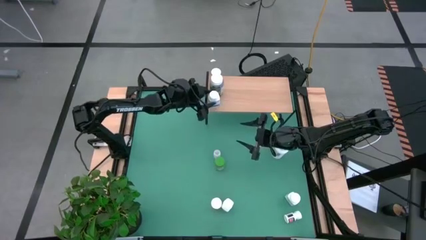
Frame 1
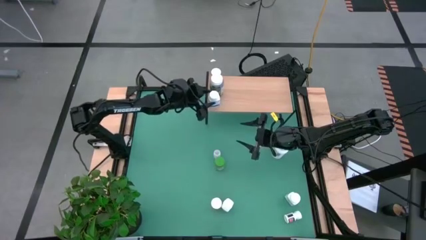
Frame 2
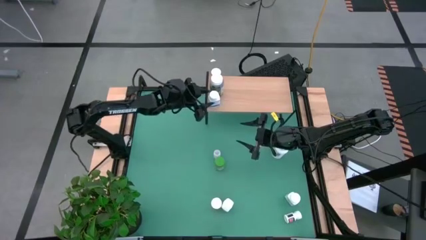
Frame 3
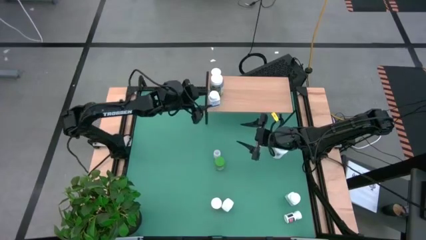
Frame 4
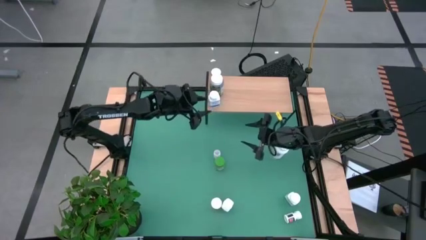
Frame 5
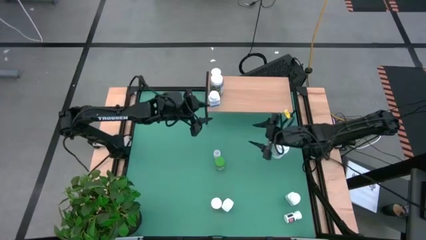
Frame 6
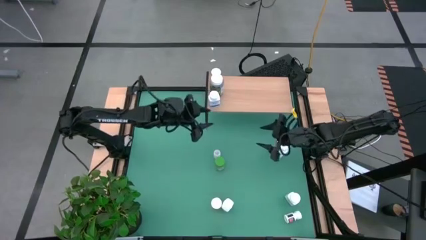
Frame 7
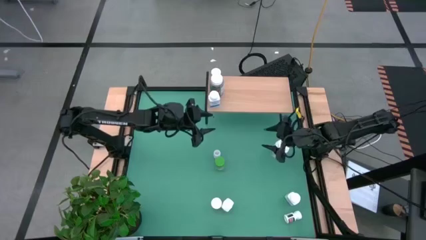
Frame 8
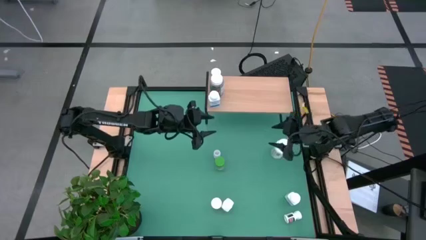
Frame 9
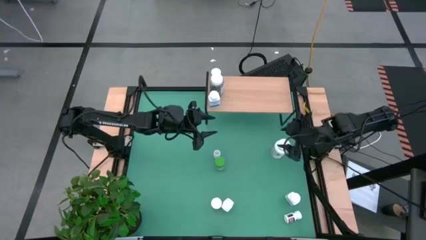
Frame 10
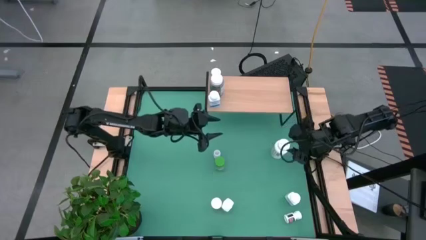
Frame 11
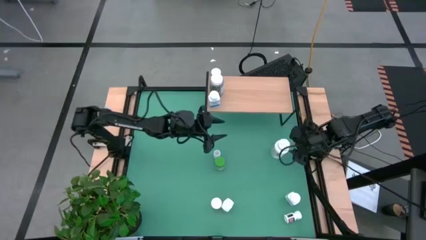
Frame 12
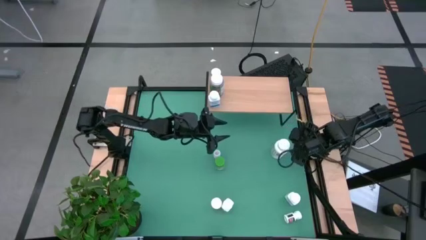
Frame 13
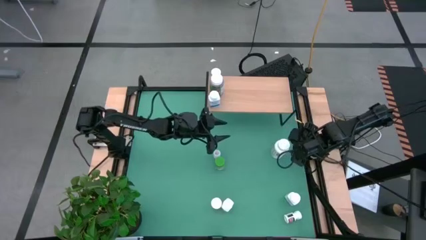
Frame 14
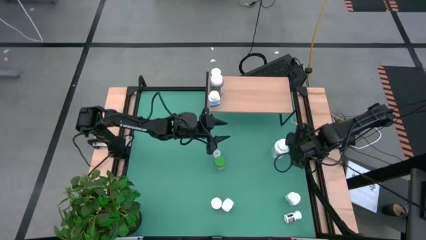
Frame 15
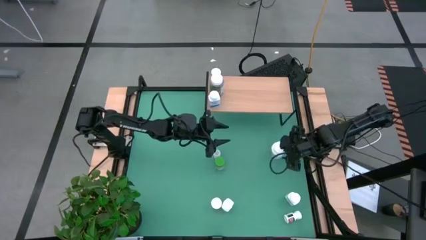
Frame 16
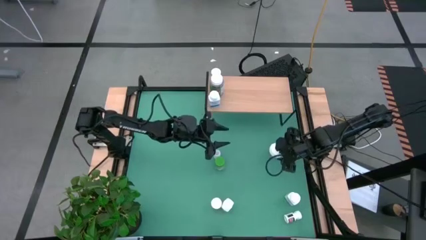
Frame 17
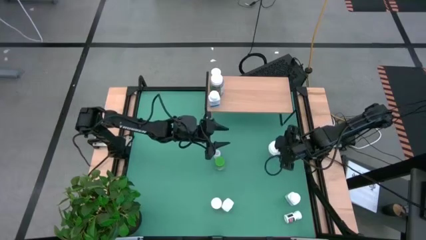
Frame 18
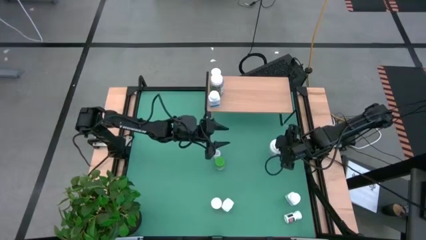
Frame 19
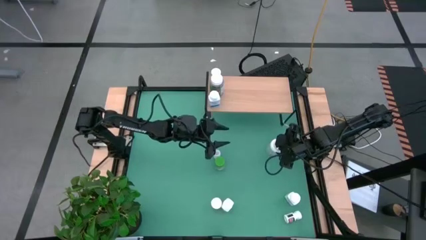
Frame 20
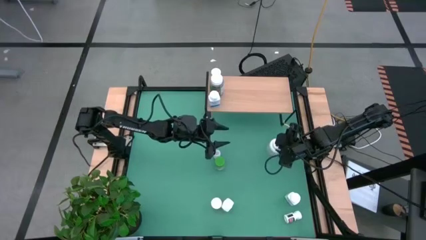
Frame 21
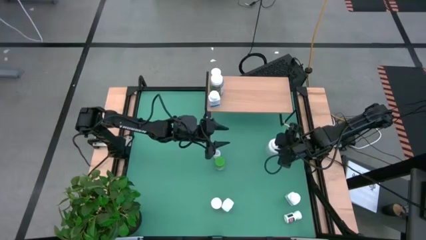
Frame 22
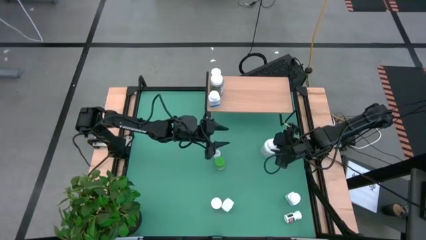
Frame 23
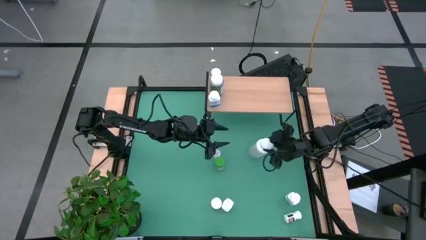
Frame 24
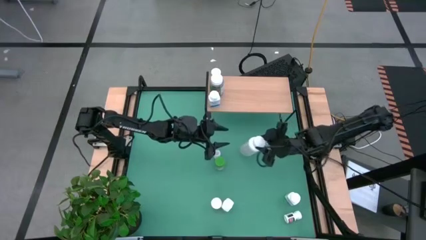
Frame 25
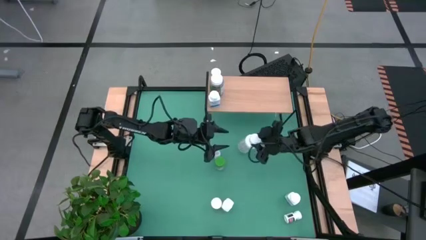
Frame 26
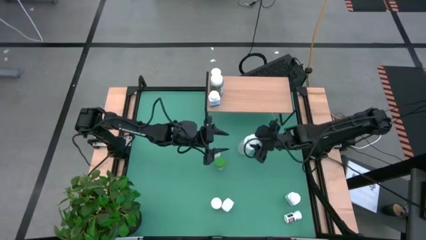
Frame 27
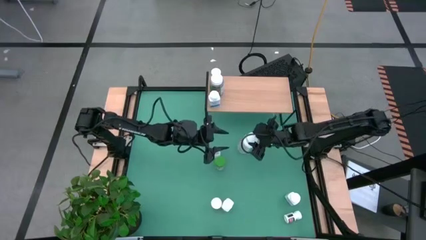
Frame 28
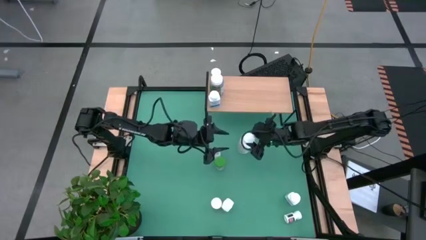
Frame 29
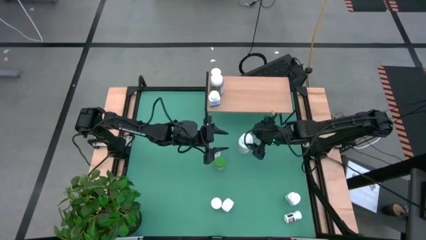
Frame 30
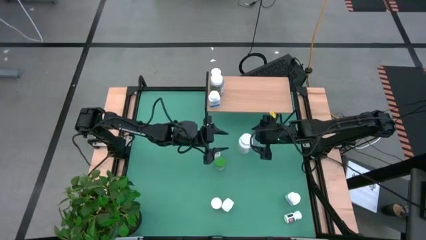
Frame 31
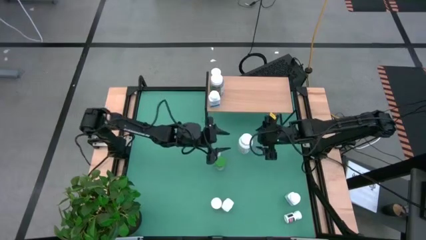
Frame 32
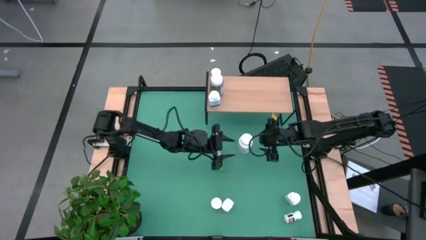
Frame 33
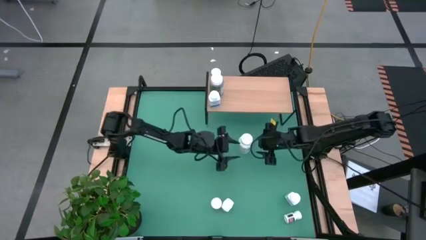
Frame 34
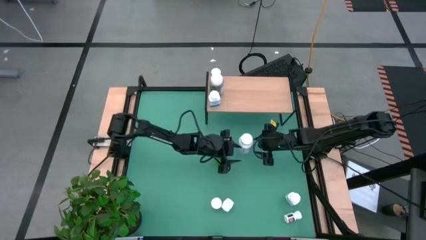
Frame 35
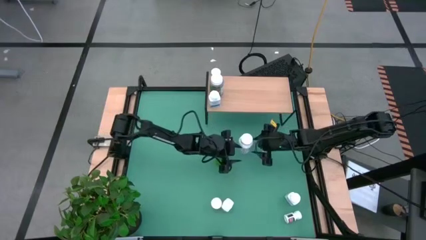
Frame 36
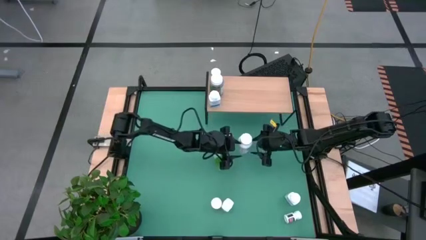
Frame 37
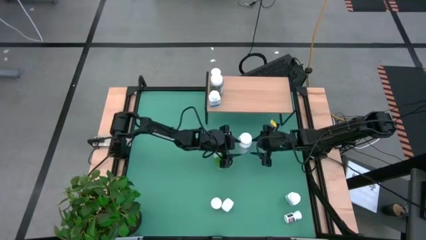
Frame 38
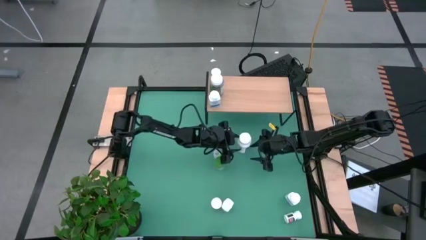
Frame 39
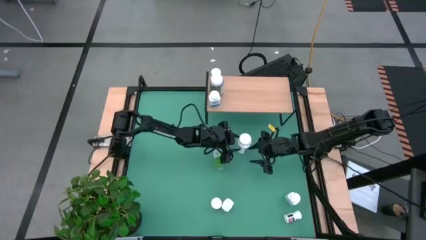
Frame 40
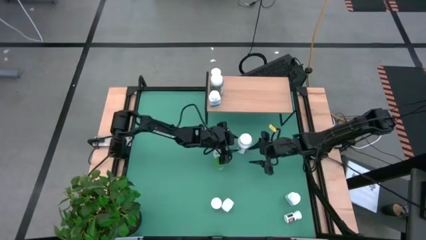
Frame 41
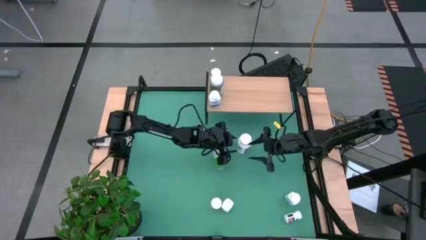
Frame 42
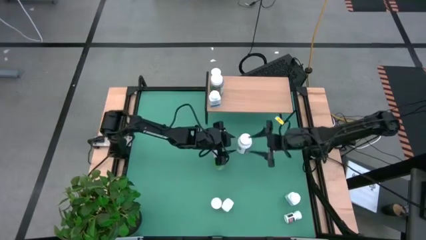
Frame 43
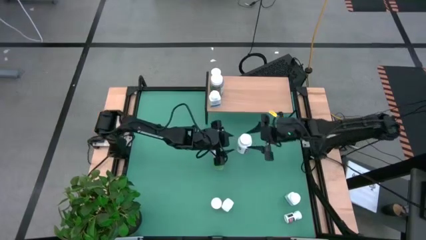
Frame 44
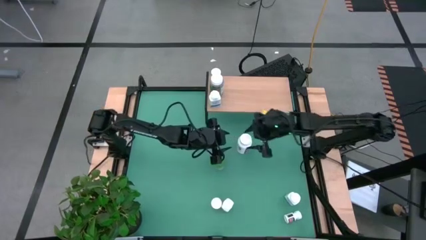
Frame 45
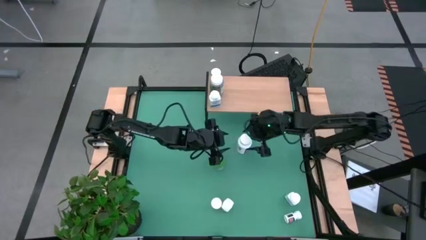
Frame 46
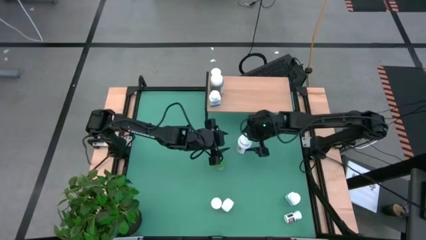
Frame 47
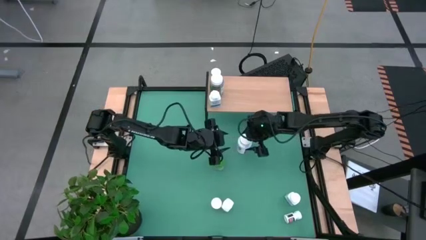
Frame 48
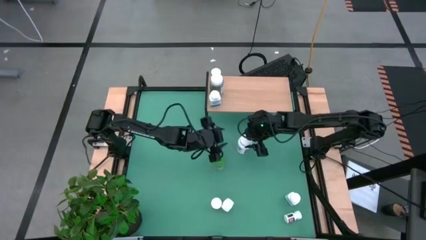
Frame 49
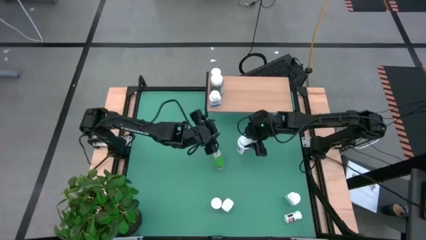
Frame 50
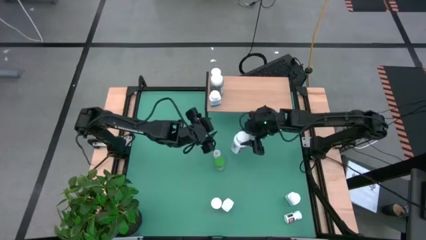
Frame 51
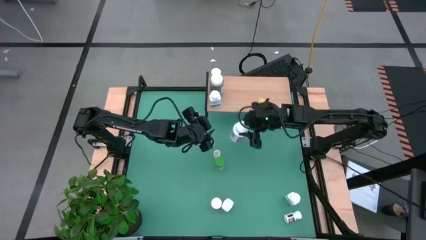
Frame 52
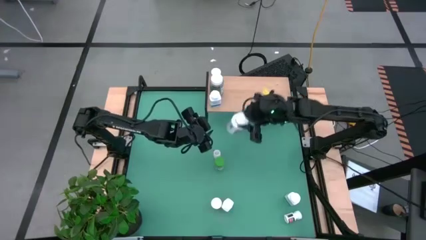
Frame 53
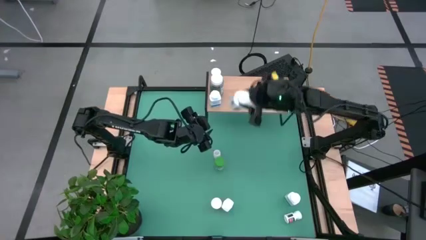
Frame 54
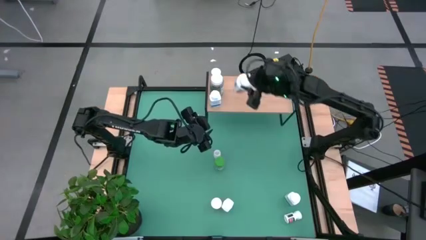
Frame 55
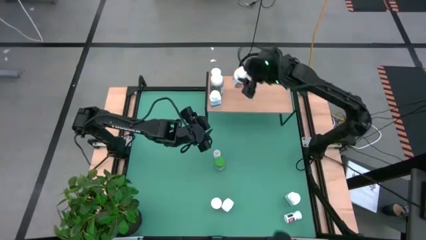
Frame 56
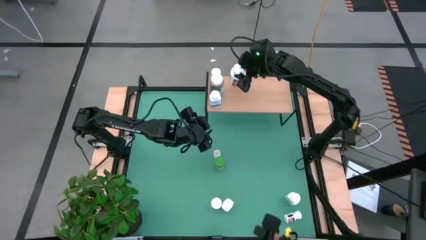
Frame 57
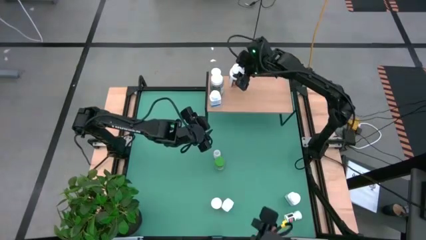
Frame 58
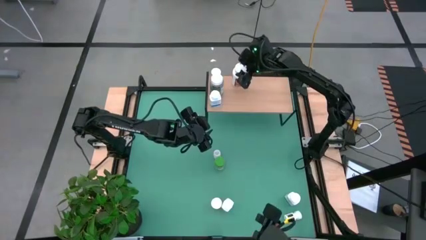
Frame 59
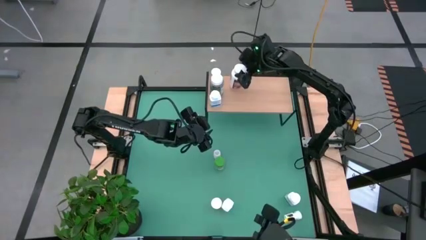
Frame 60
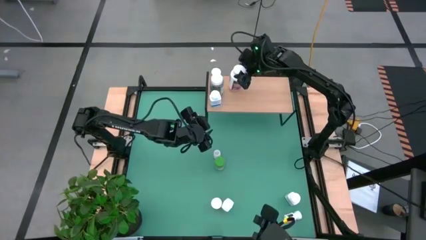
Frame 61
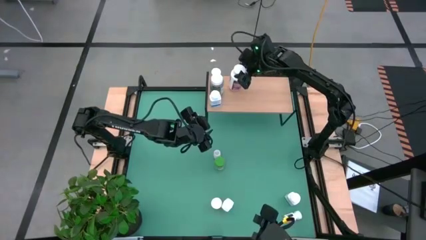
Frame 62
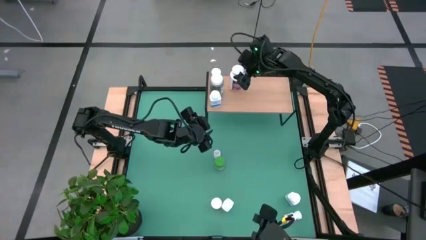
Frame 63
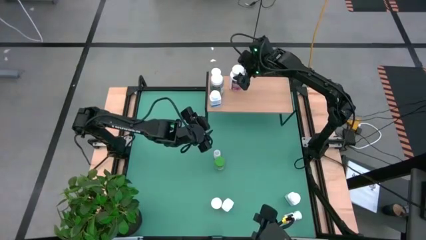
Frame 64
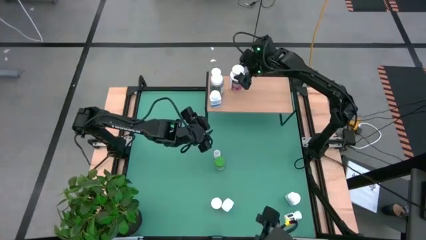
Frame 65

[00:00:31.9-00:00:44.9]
Task: Pick and place medicine bottles onto shelf by color
Put the white and red pill bottle on the shelf

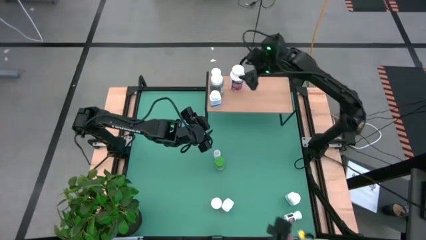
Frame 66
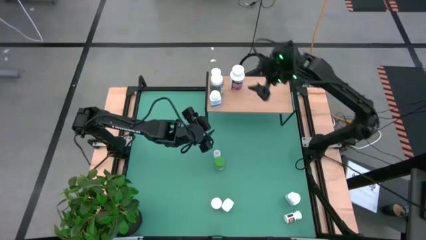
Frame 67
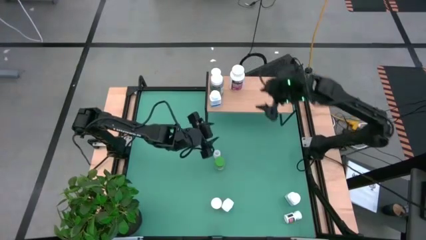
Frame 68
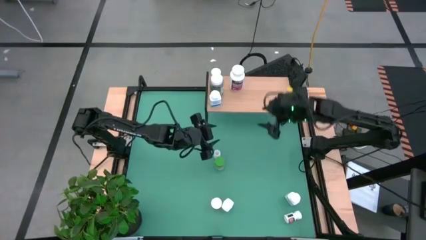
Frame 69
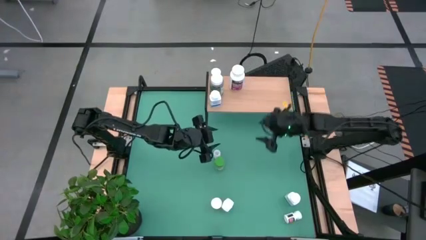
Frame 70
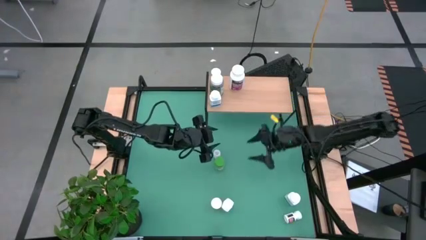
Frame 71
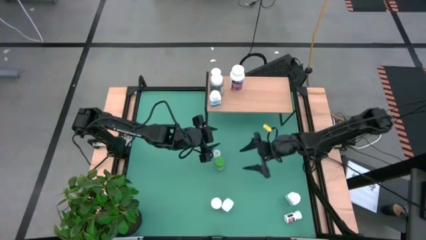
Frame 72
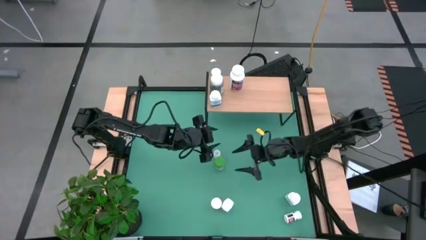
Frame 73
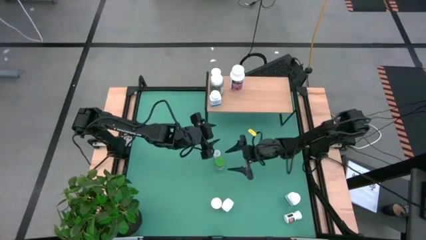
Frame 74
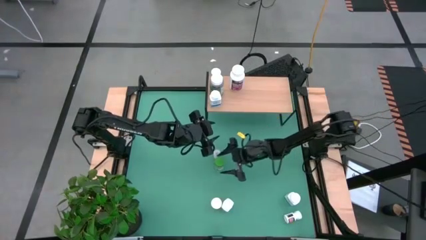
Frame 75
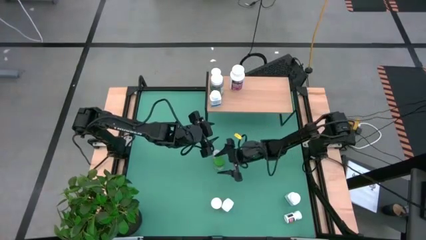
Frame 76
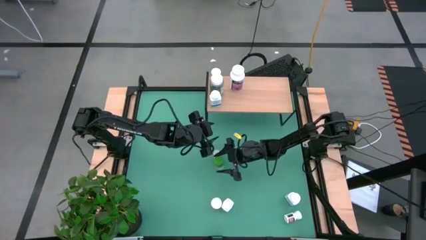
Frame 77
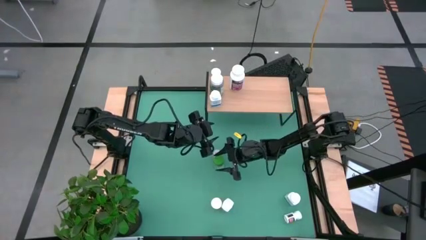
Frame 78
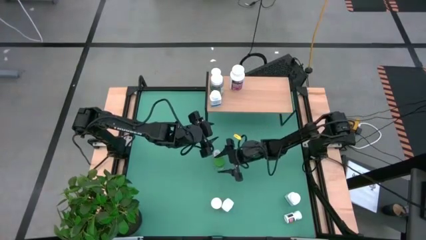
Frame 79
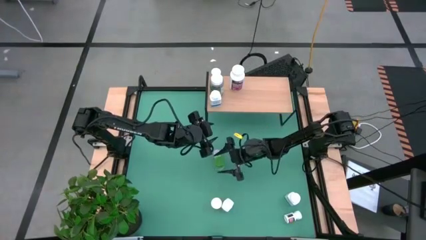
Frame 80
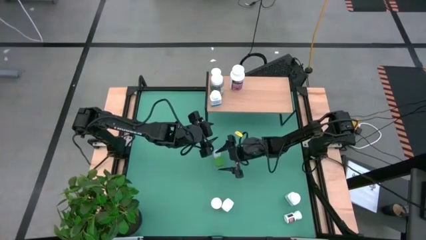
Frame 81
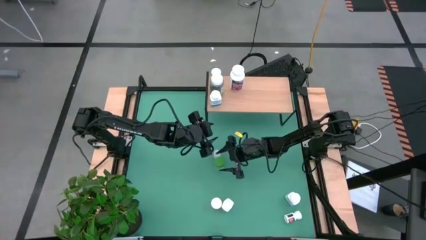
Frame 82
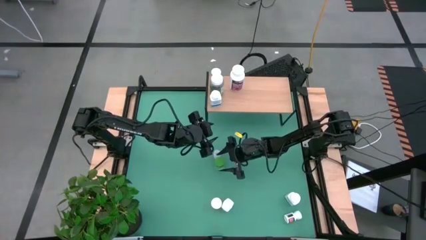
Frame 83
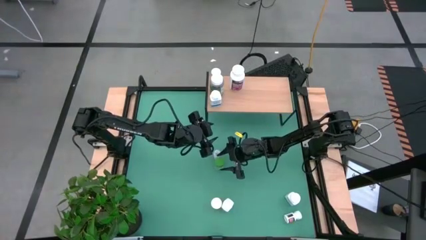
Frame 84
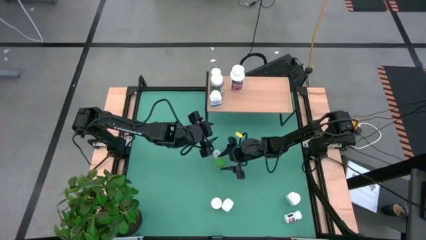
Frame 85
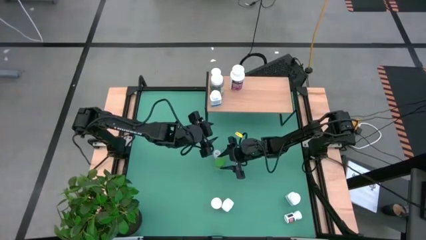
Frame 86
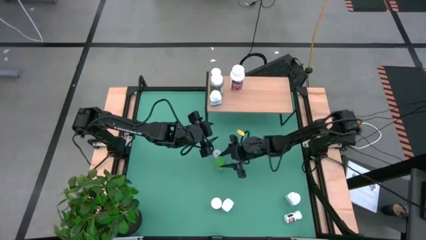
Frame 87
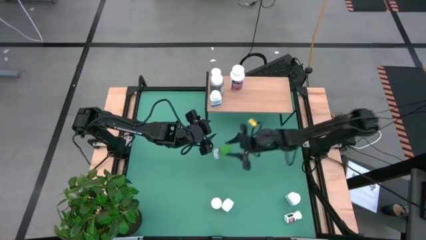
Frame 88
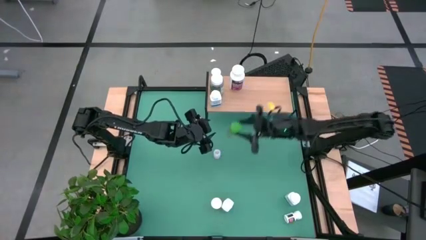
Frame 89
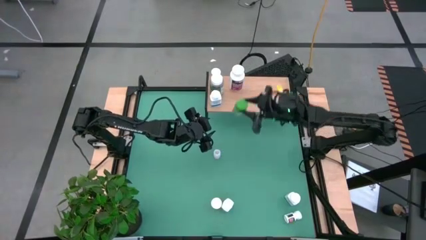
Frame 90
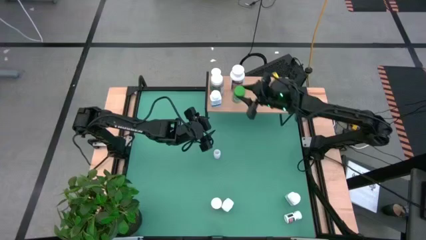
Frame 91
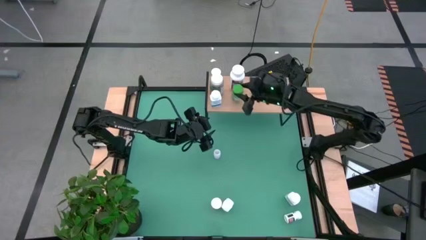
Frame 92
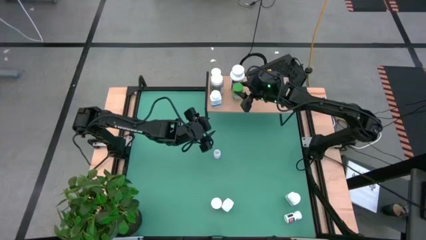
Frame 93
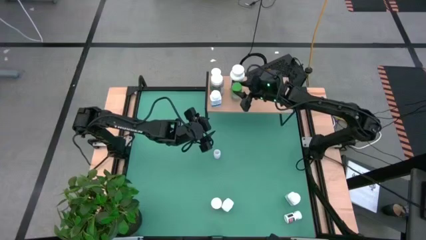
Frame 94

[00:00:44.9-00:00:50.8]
Put the green pill bottle on the shelf
